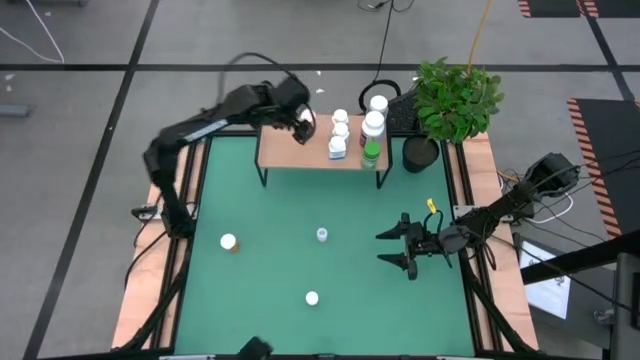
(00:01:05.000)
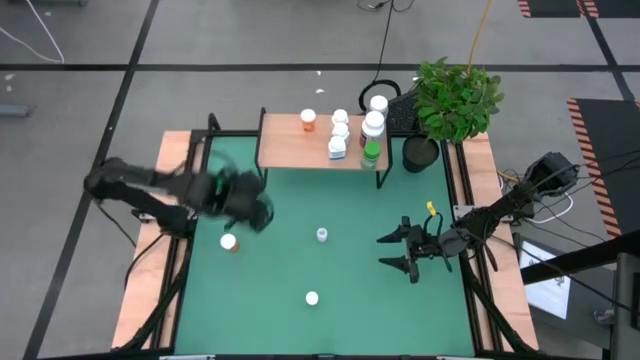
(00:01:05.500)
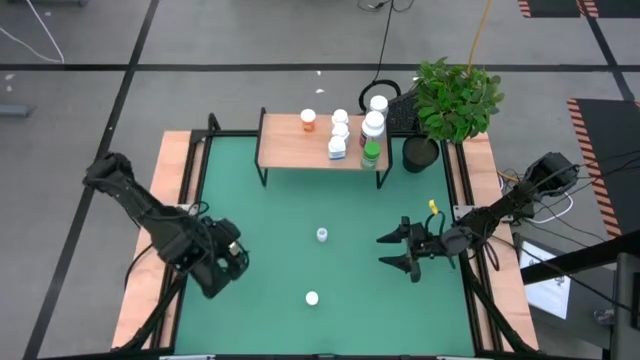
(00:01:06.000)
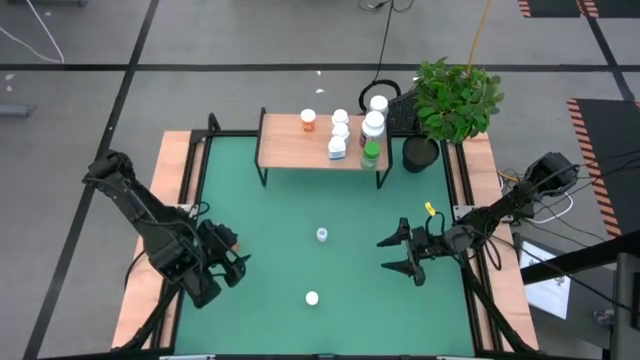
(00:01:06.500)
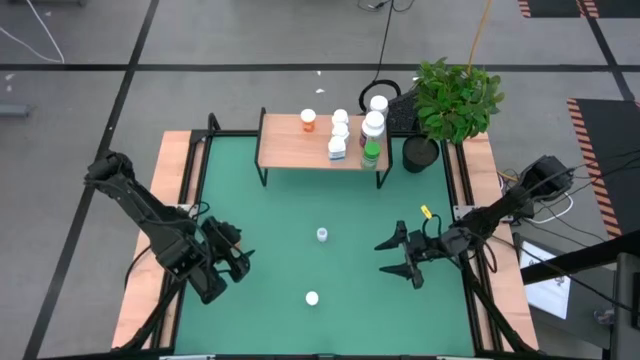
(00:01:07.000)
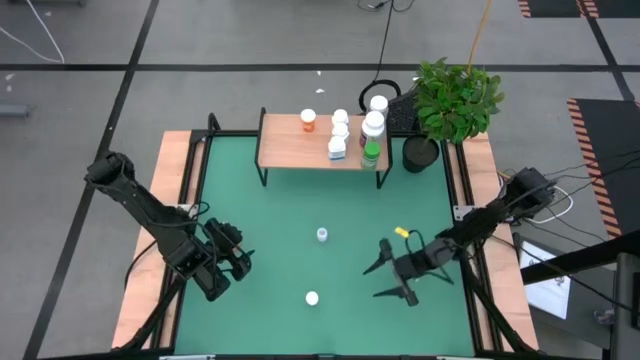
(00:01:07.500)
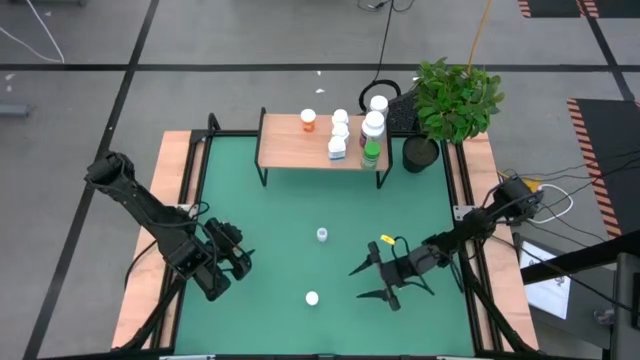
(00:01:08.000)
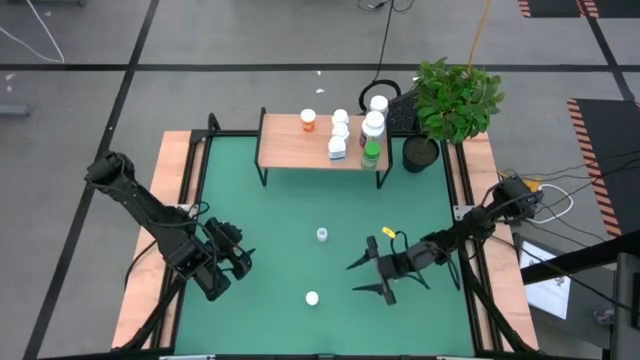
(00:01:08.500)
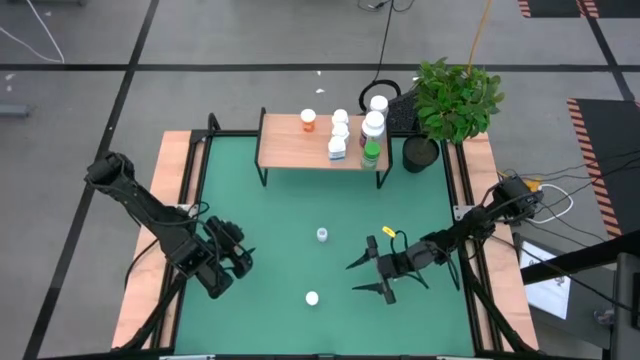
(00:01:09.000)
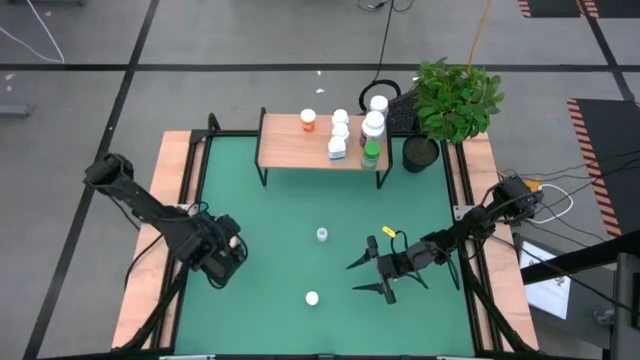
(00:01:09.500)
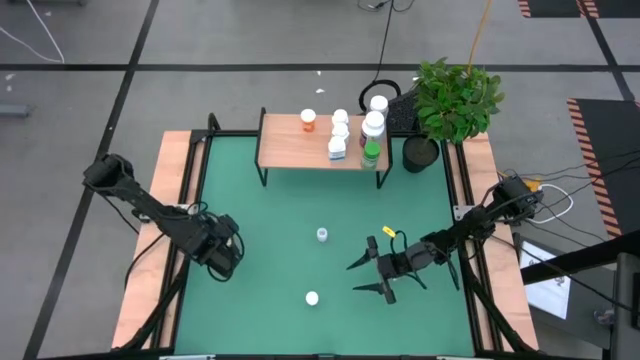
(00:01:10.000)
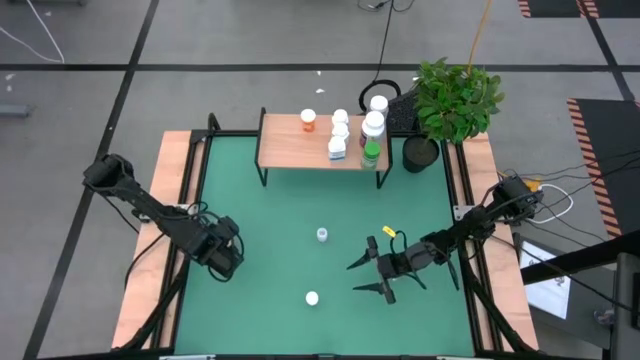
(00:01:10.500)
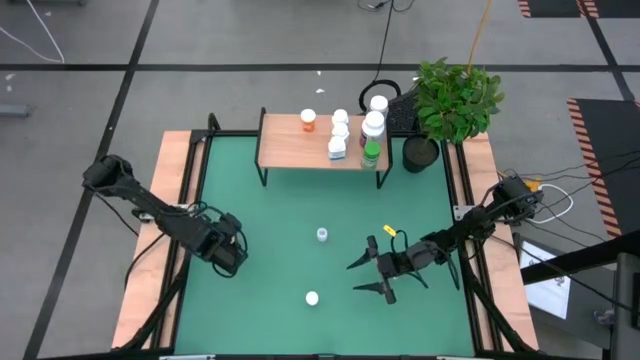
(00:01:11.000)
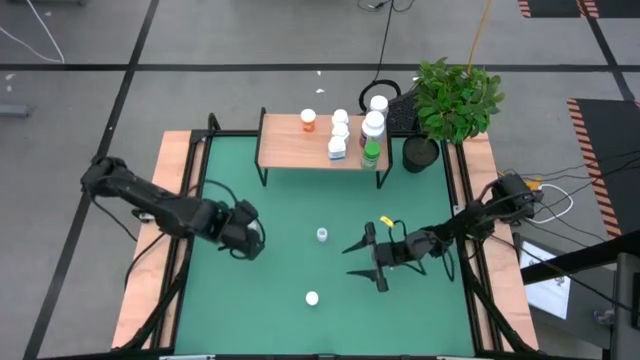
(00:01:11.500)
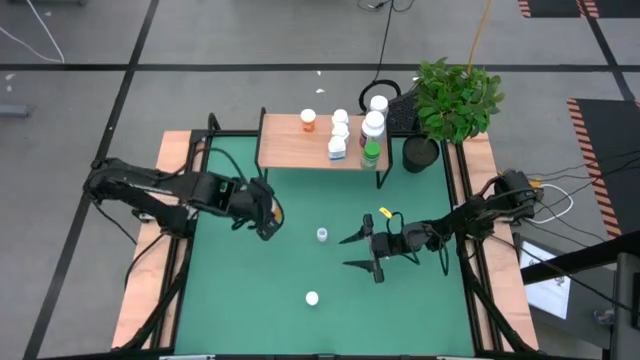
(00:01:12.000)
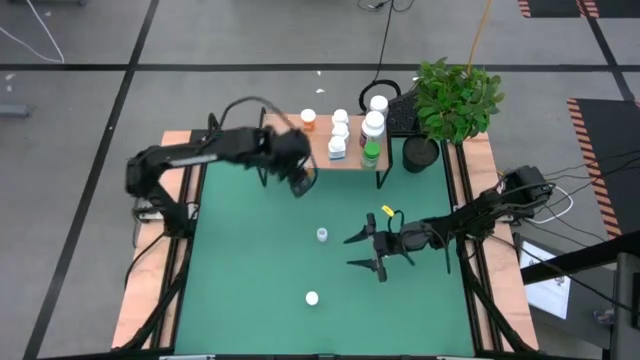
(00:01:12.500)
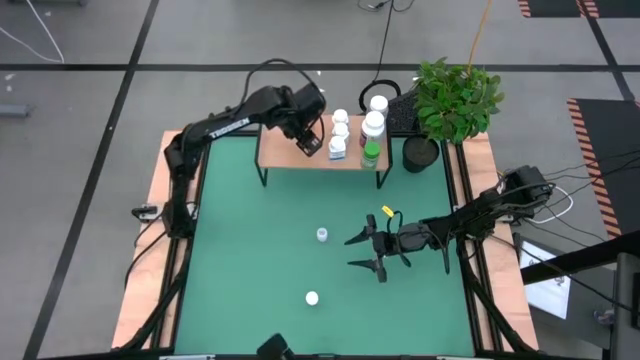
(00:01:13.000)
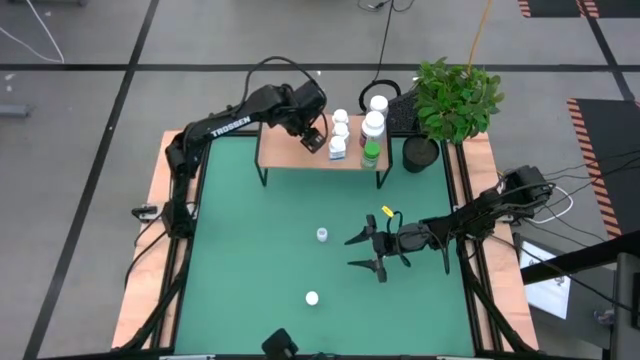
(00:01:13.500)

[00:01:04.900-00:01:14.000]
Task: Pick and place medicine bottles onto shelf by color
Align the big orange pill bottle with the other big orange pill bottle on the shelf

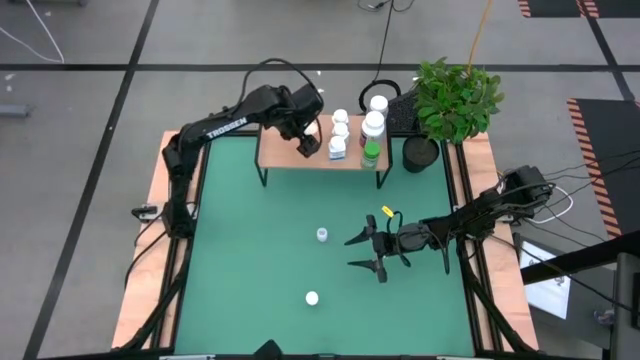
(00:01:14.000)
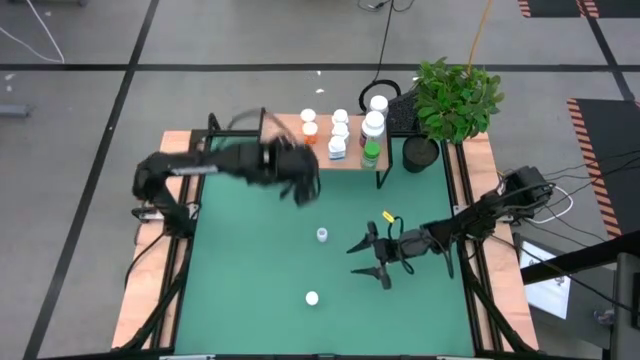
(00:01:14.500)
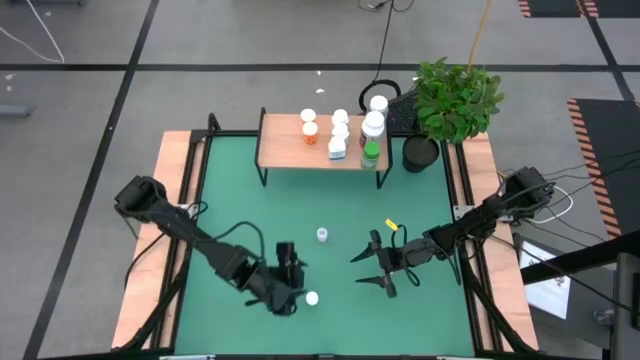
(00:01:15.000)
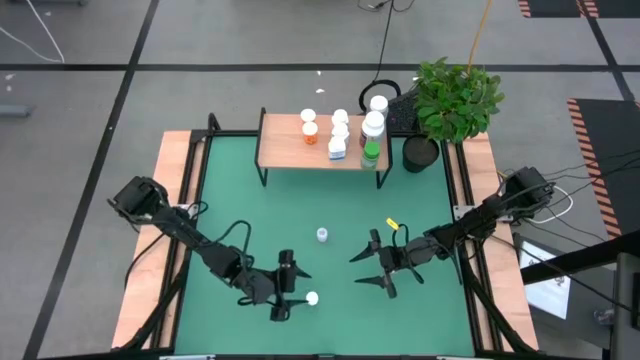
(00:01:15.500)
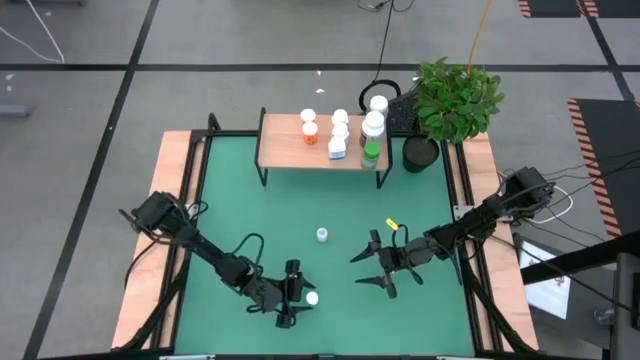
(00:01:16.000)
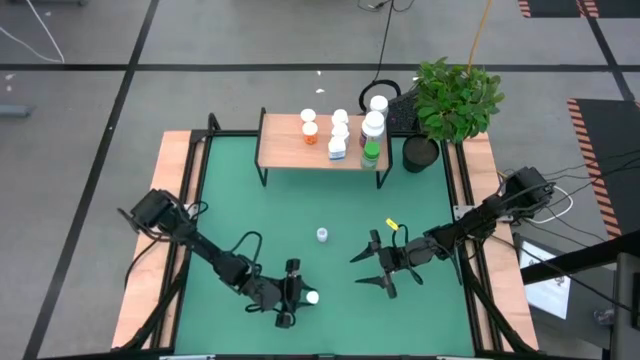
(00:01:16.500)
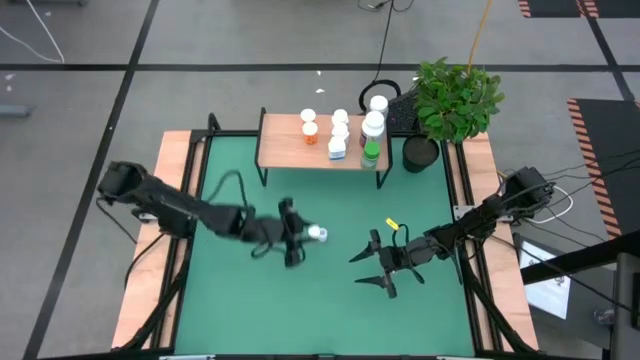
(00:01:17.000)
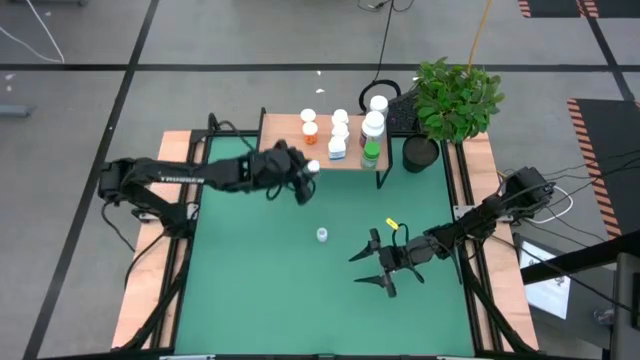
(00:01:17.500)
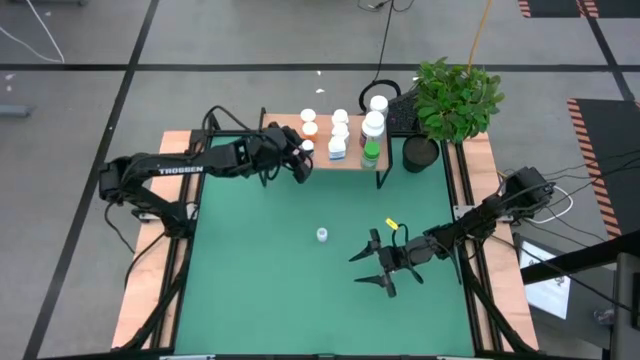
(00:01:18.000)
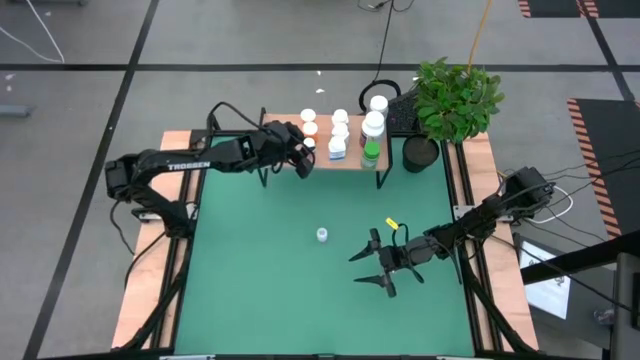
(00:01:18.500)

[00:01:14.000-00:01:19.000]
Put the big black and white pill bottle on the shelf

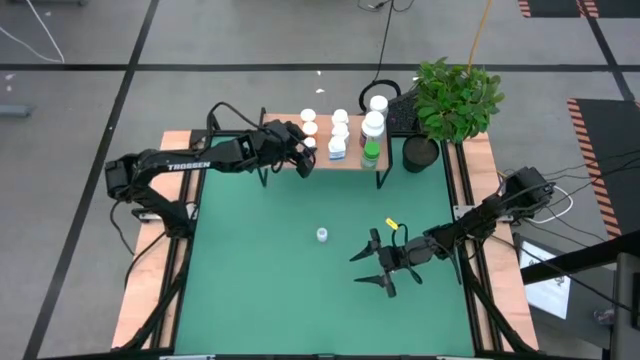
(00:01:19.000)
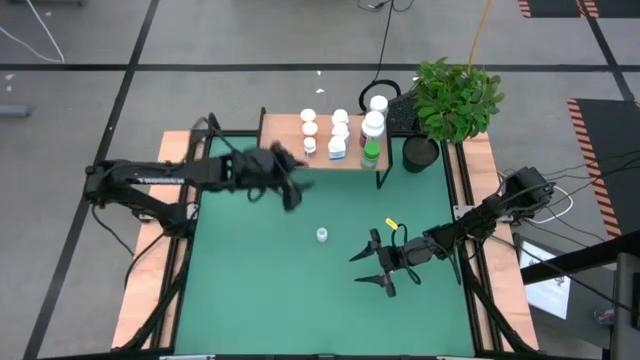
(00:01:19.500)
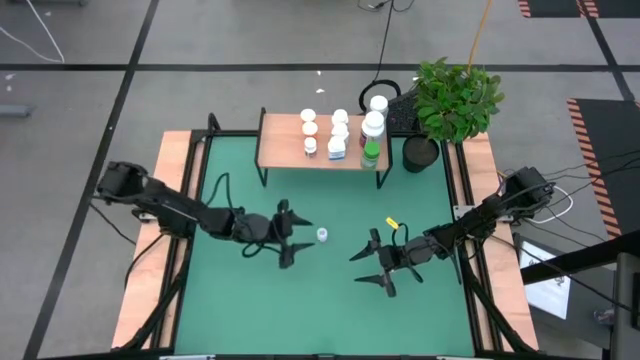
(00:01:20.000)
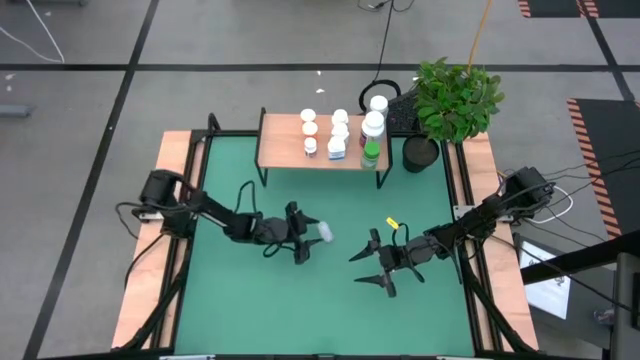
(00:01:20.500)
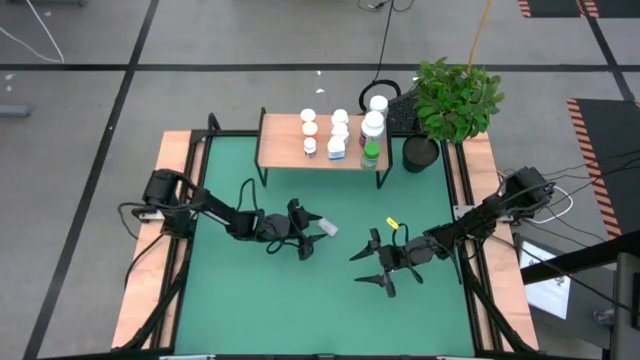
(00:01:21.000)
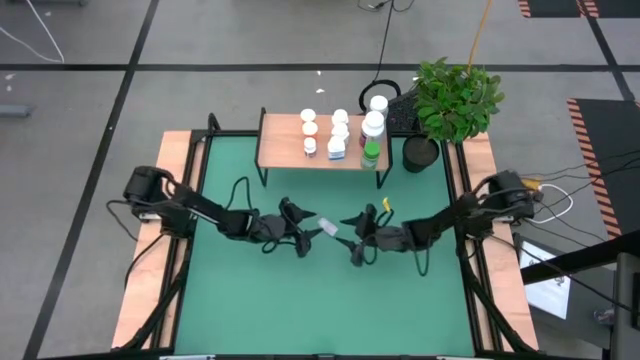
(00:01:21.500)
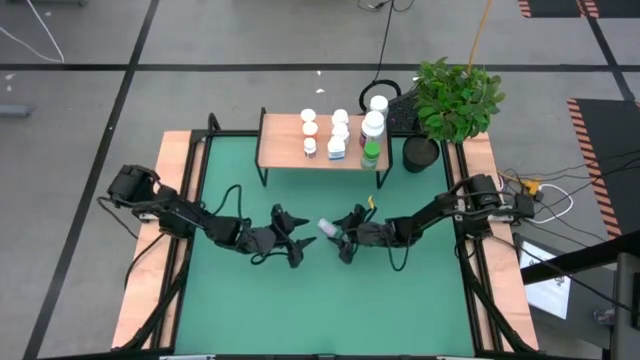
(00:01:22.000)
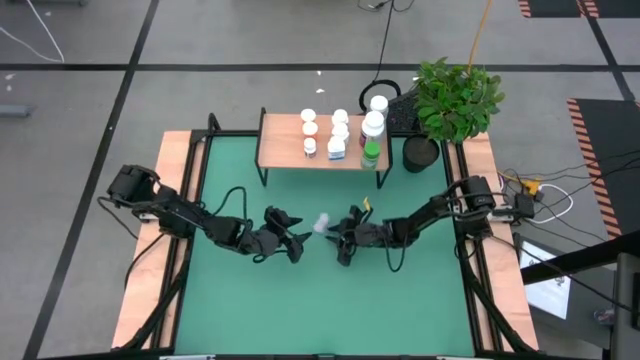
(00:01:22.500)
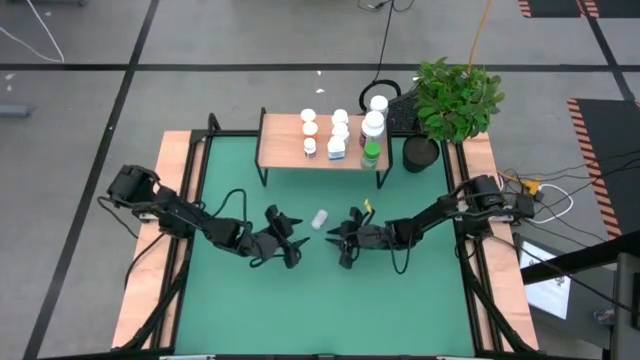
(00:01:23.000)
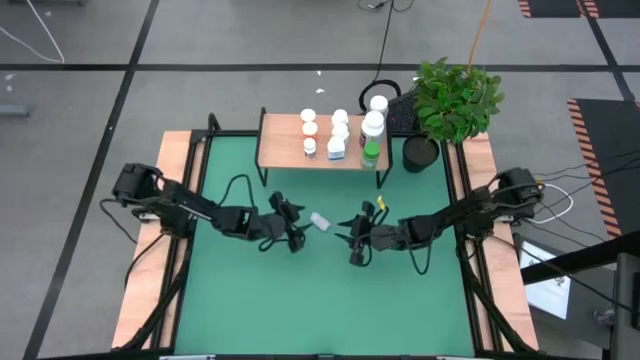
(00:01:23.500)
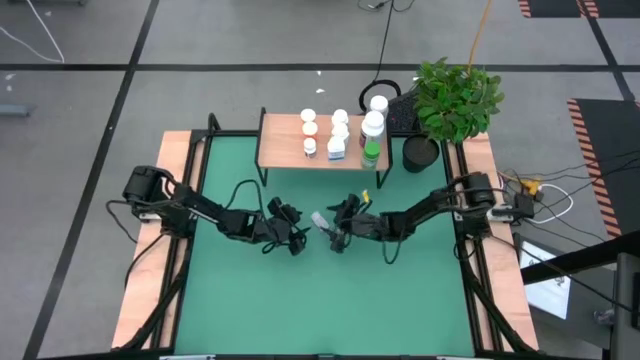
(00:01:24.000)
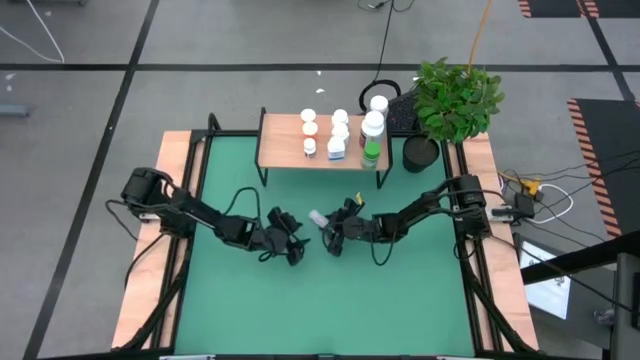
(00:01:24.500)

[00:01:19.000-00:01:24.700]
Put the small transparent pill bottle on the shelf
